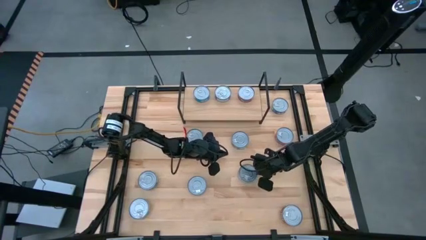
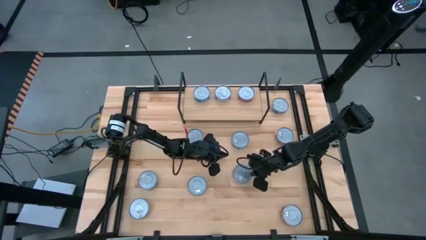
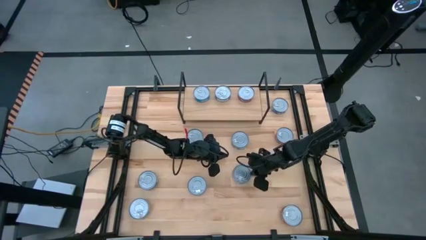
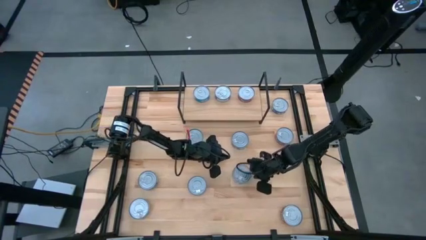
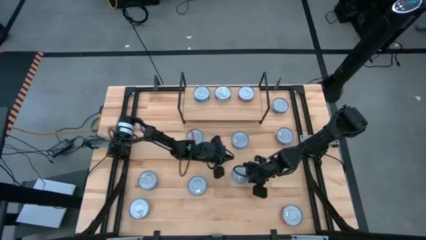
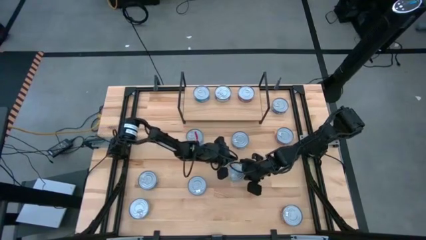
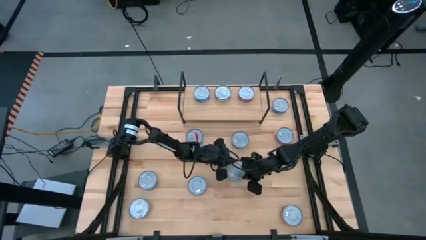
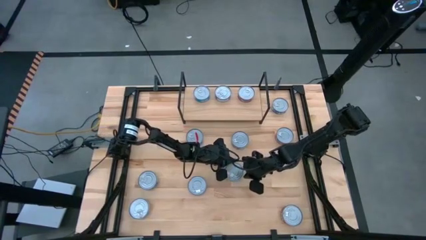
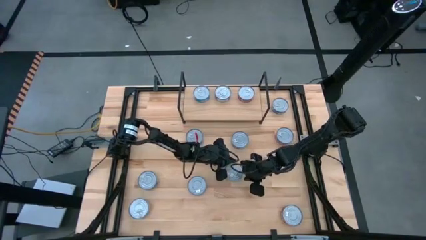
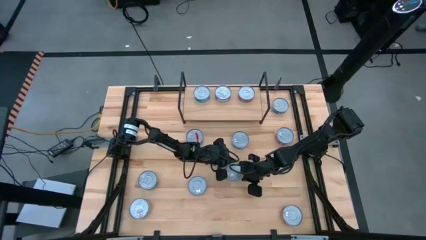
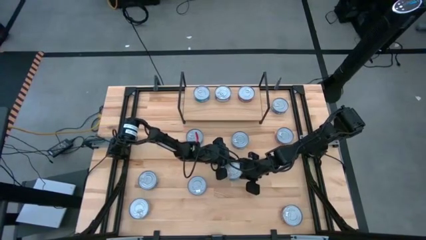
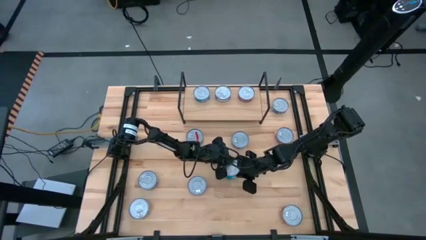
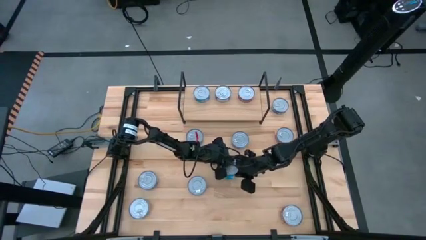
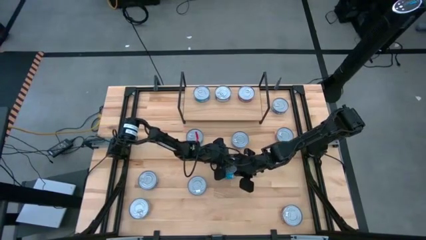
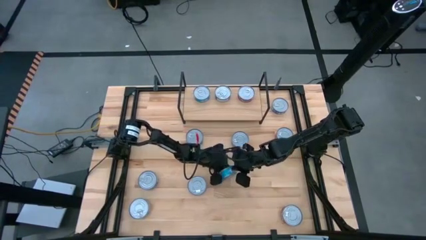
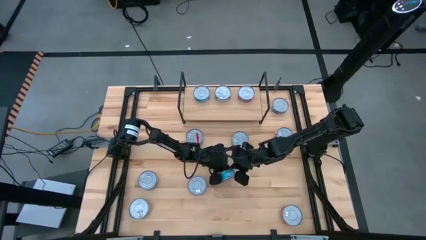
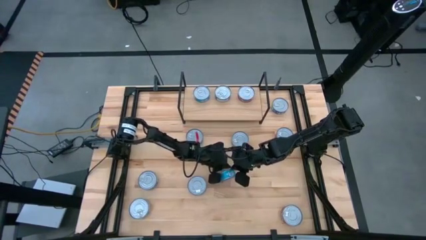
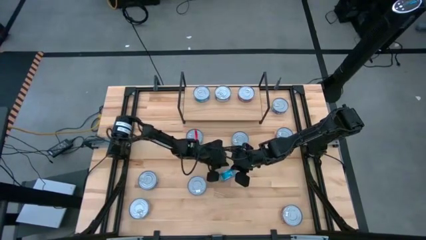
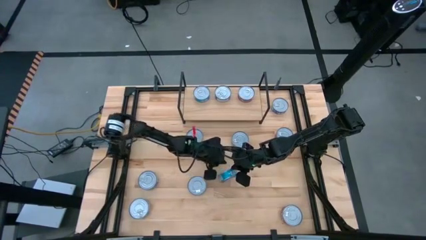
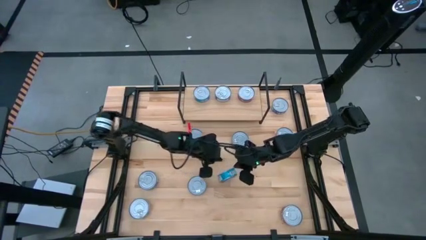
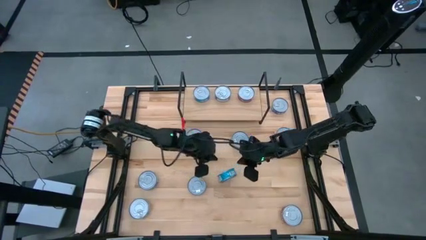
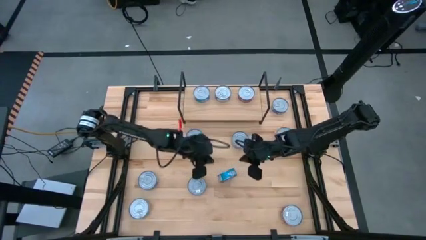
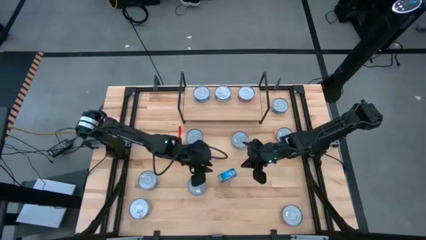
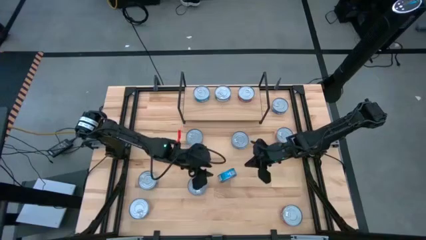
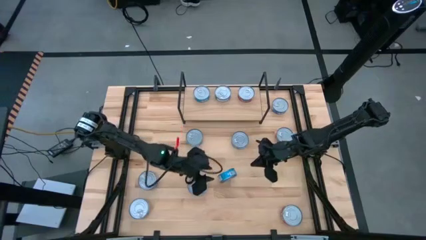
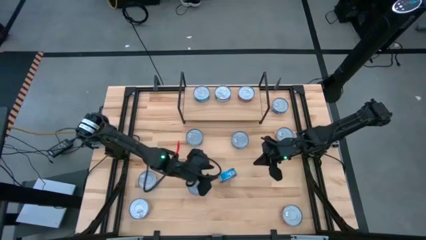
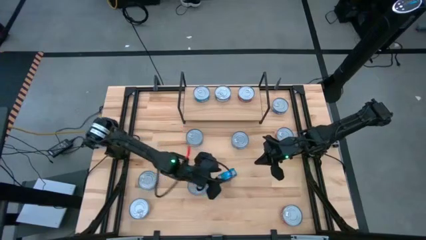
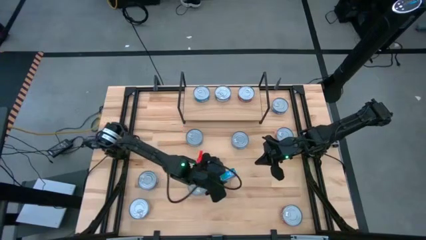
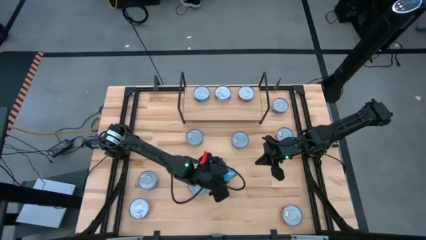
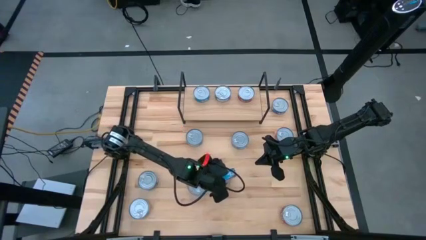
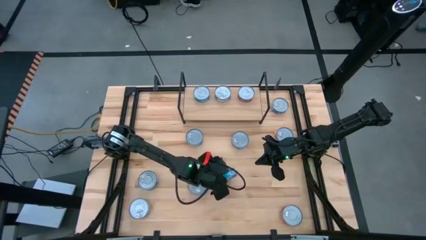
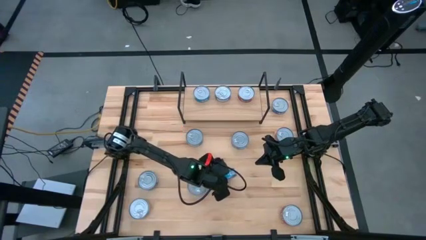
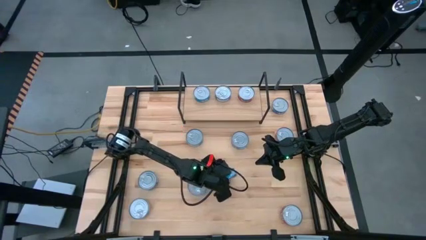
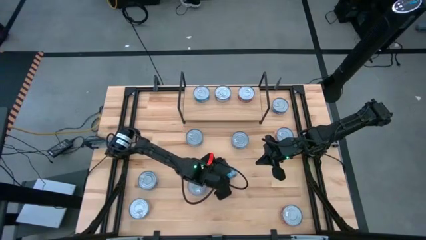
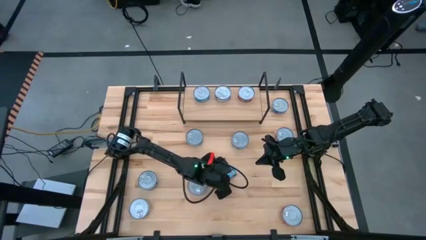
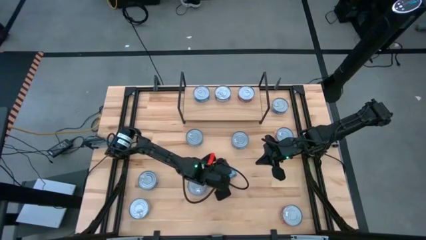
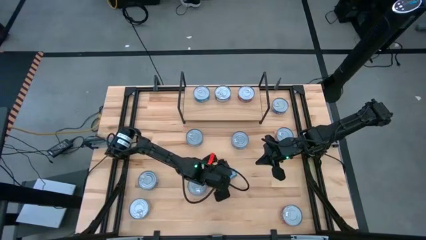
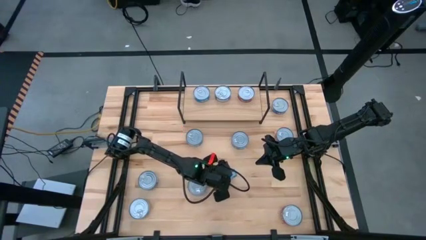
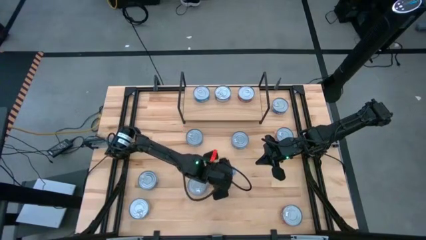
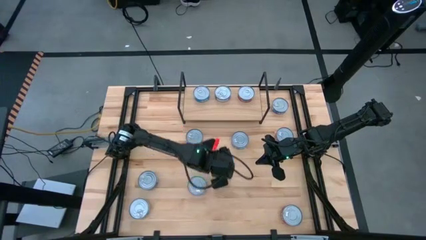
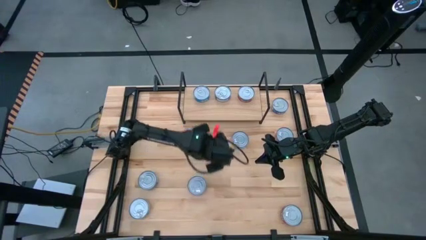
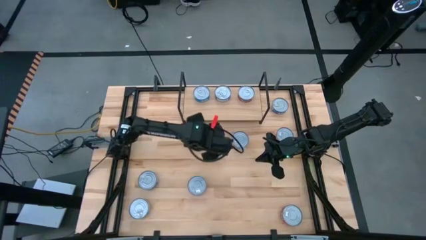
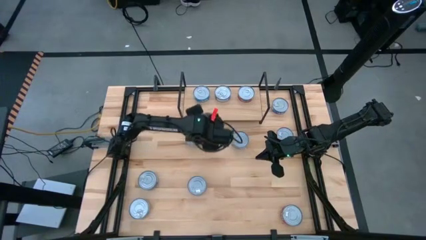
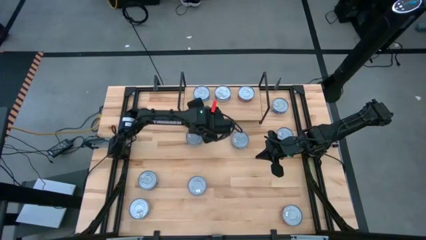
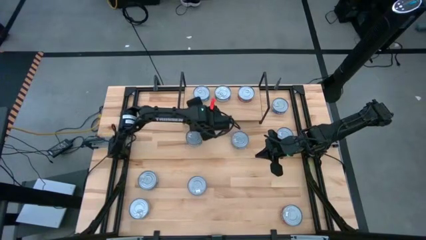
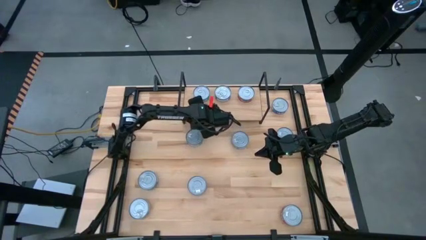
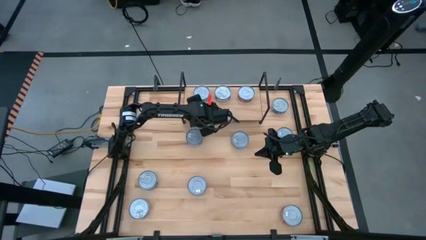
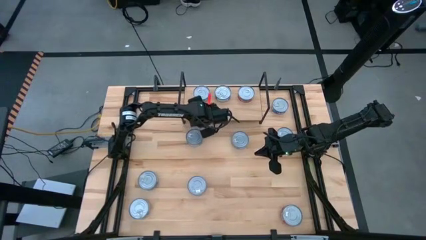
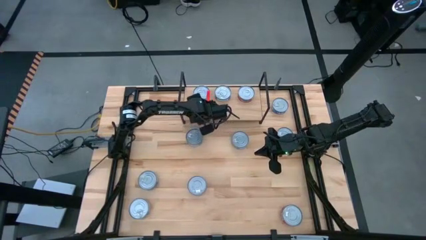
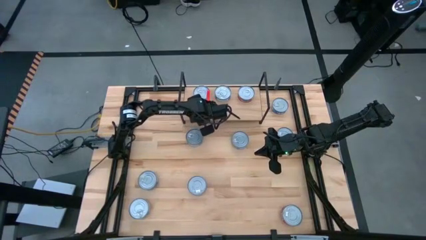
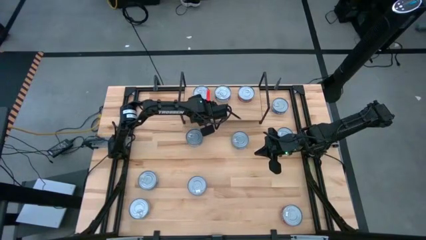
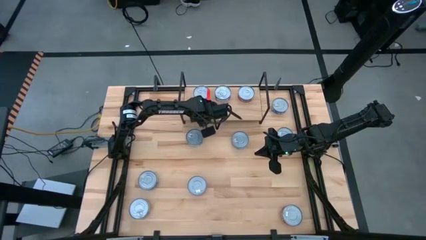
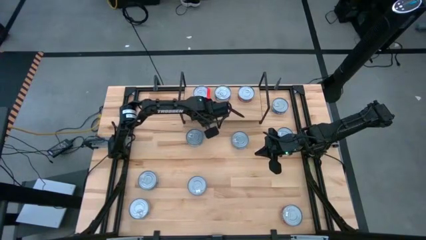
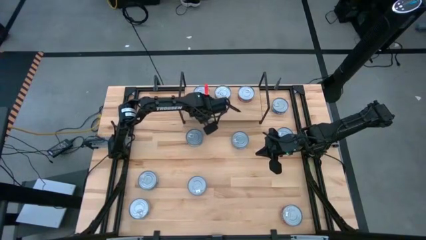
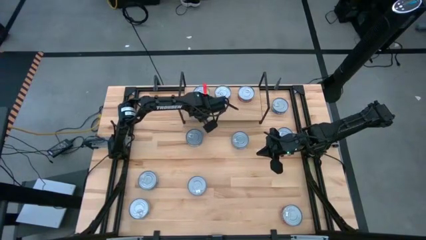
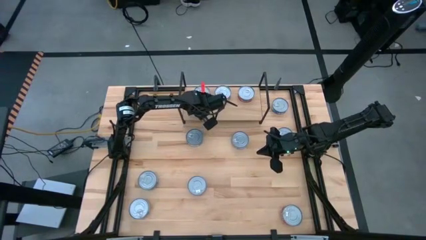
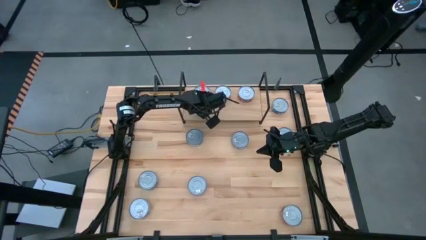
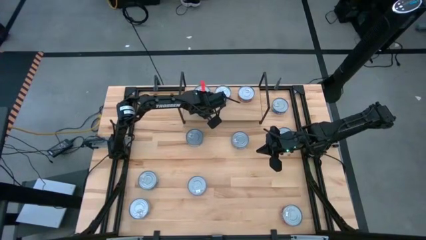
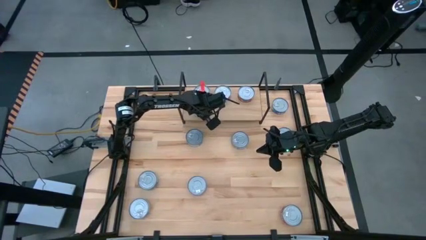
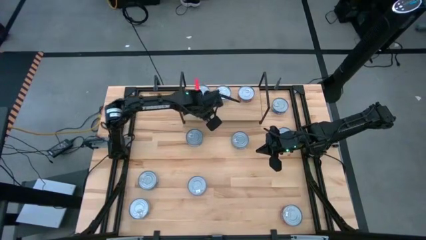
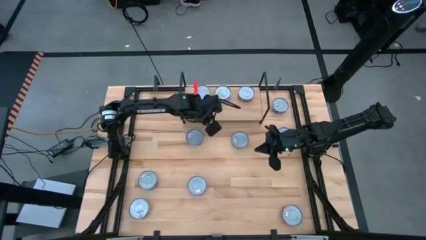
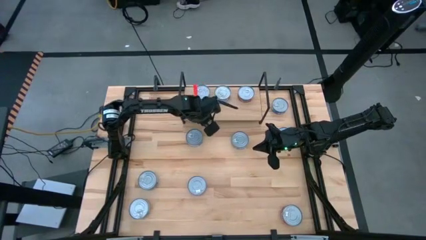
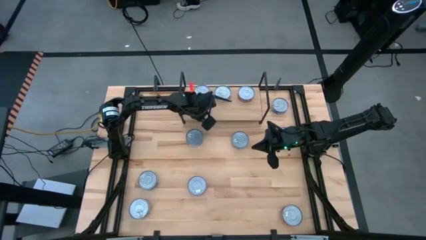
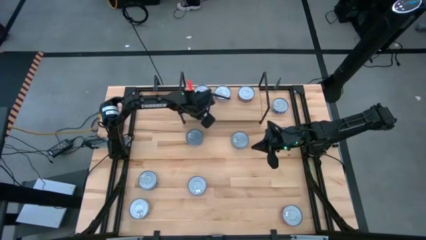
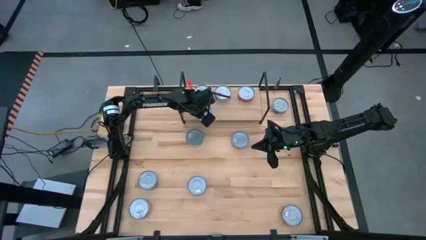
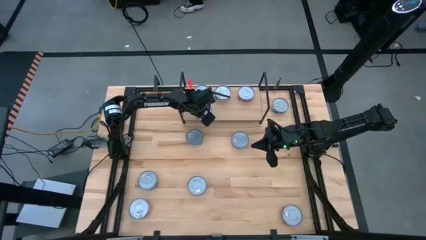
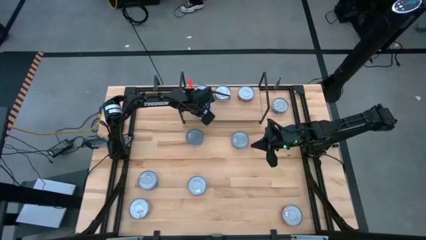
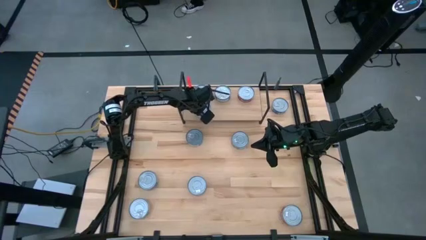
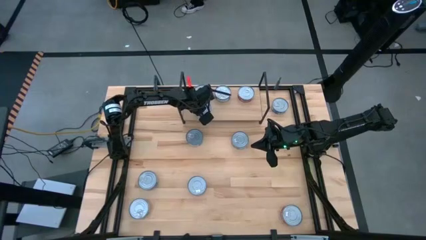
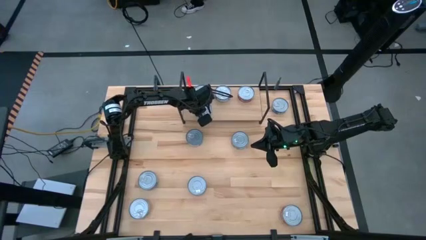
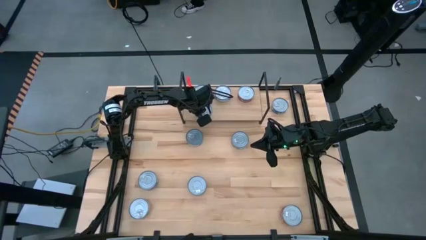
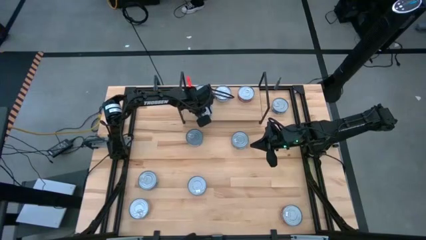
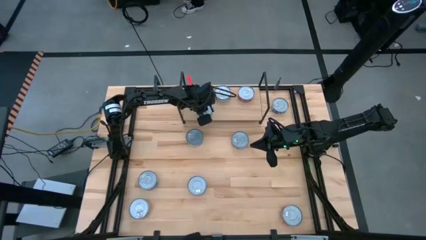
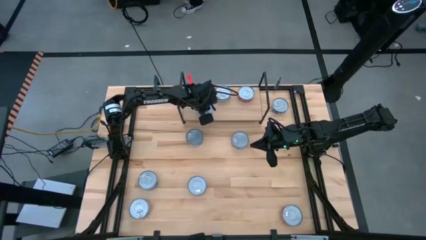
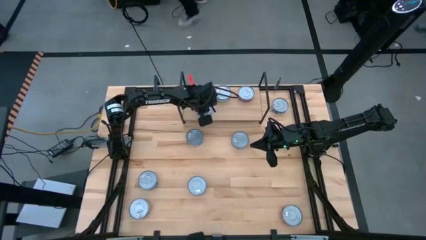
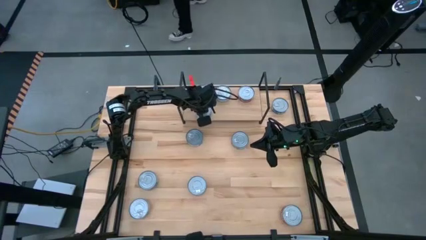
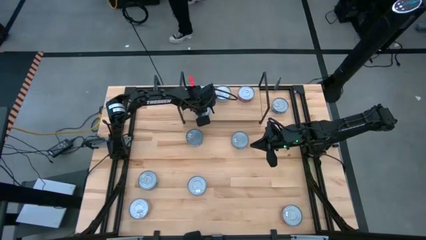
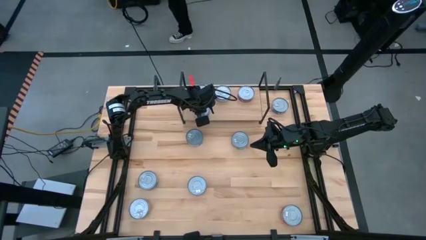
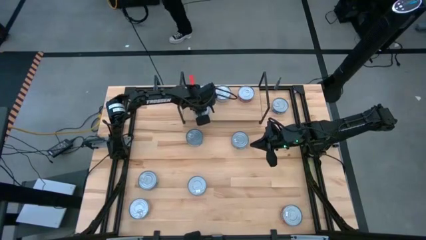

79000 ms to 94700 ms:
Task: Stack canned seafood by type on shelf
Put the yellow-blue tuna can on the shelf
